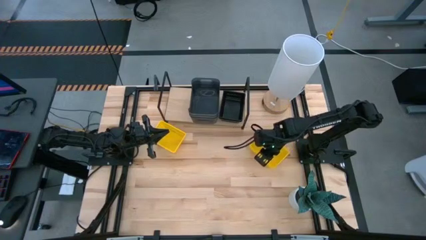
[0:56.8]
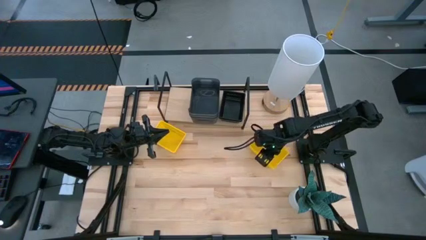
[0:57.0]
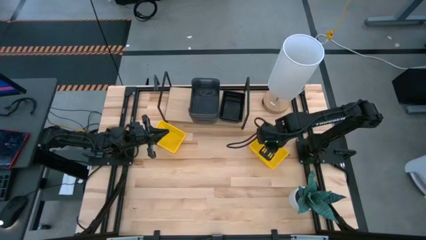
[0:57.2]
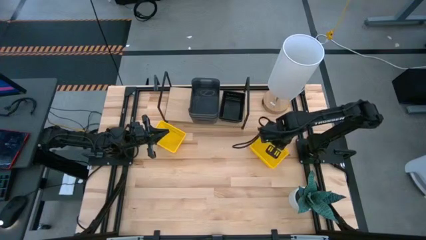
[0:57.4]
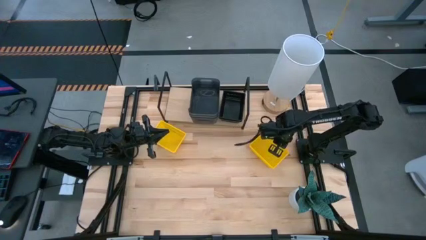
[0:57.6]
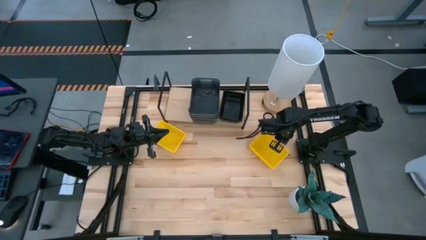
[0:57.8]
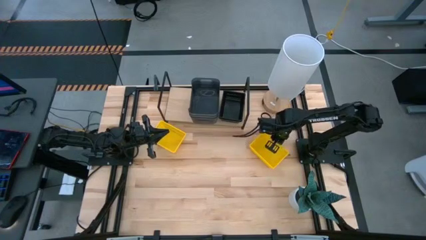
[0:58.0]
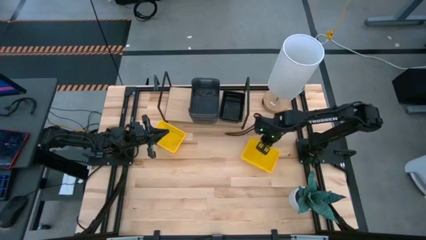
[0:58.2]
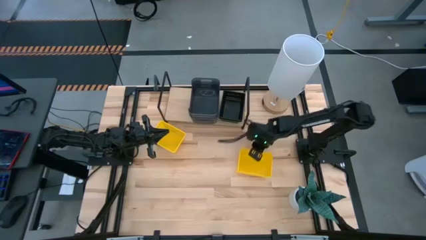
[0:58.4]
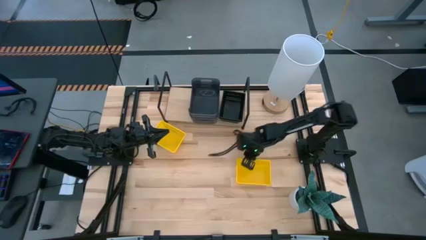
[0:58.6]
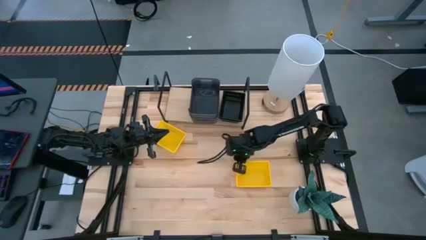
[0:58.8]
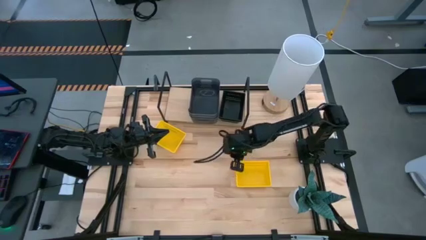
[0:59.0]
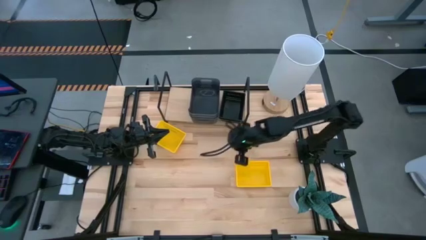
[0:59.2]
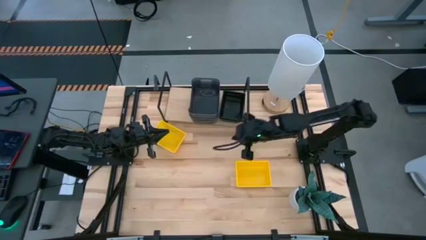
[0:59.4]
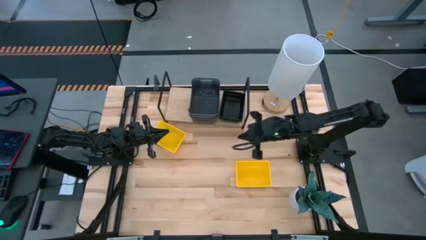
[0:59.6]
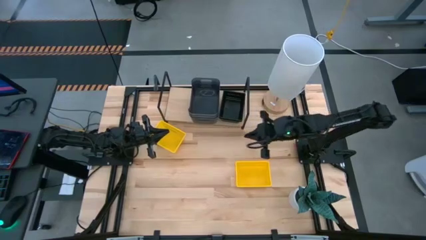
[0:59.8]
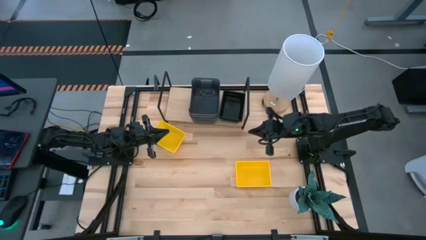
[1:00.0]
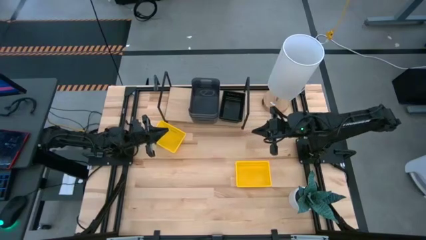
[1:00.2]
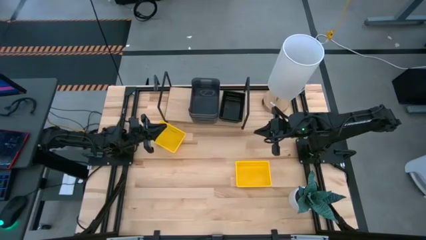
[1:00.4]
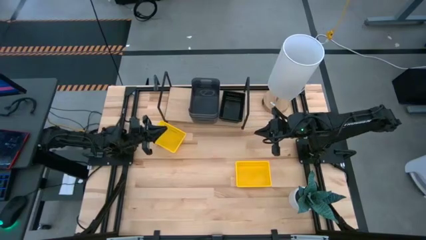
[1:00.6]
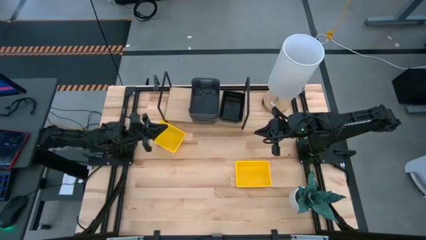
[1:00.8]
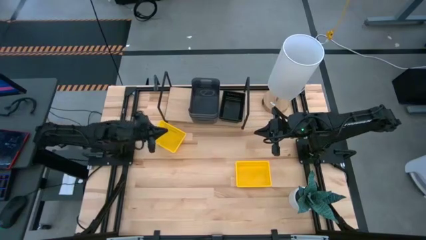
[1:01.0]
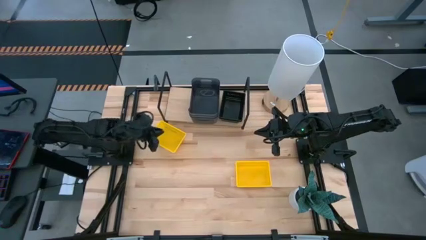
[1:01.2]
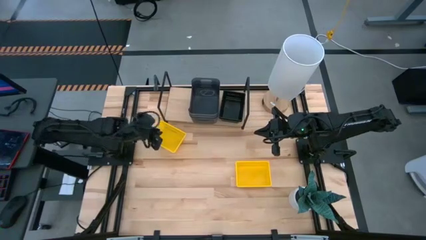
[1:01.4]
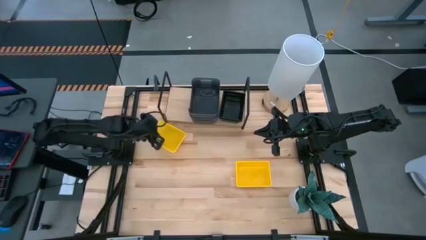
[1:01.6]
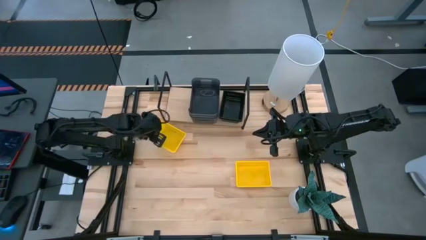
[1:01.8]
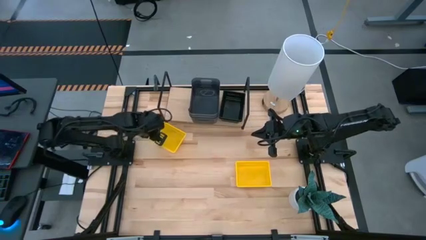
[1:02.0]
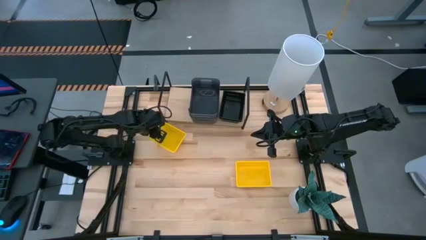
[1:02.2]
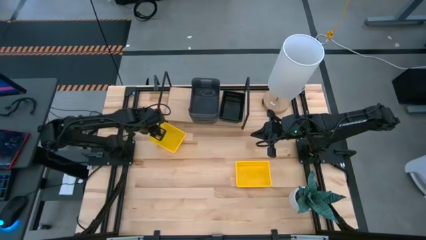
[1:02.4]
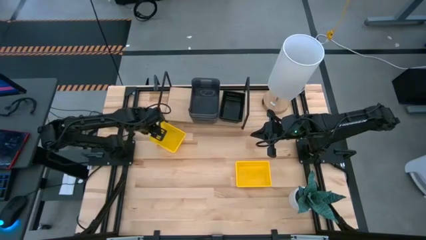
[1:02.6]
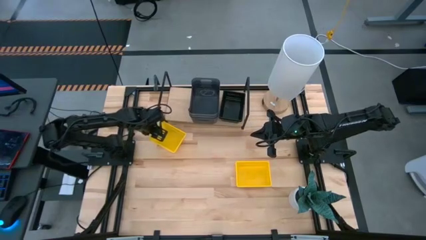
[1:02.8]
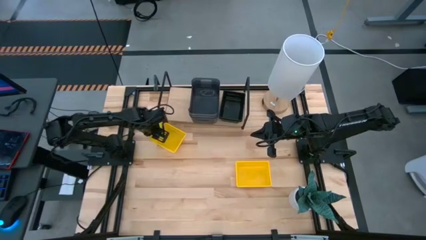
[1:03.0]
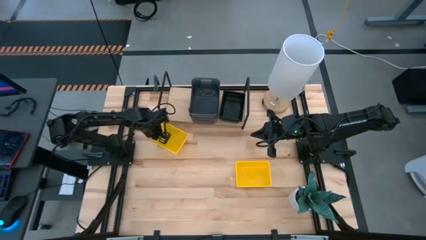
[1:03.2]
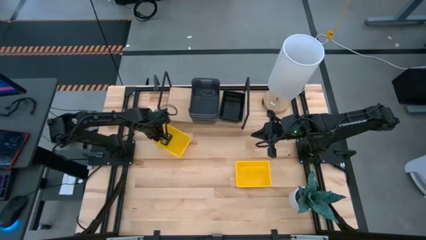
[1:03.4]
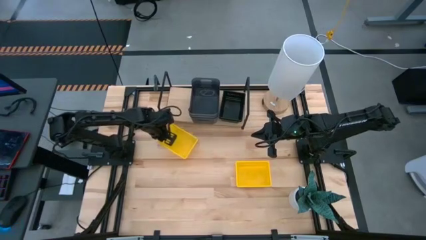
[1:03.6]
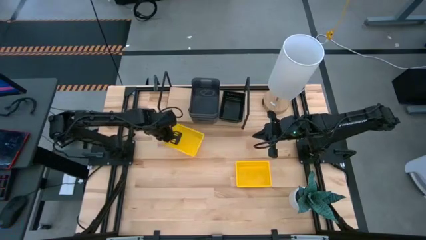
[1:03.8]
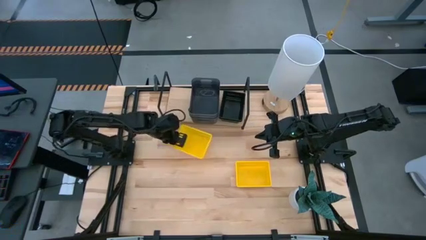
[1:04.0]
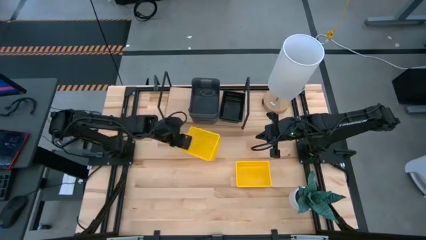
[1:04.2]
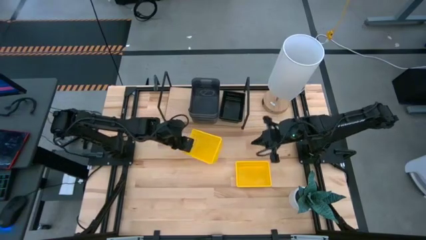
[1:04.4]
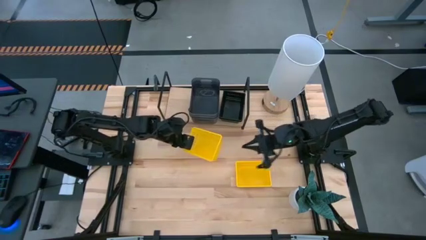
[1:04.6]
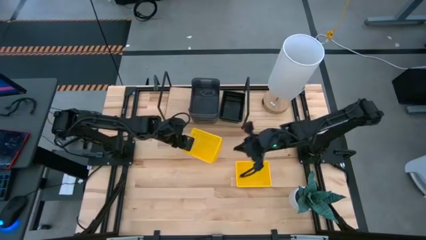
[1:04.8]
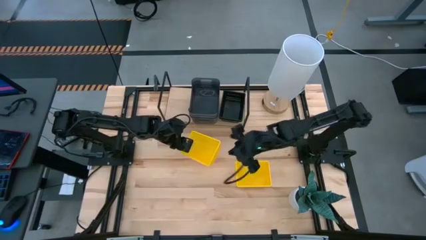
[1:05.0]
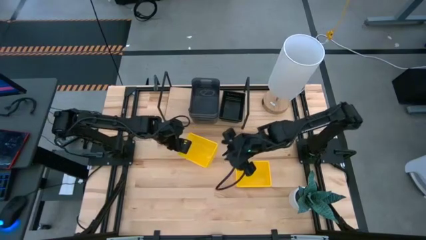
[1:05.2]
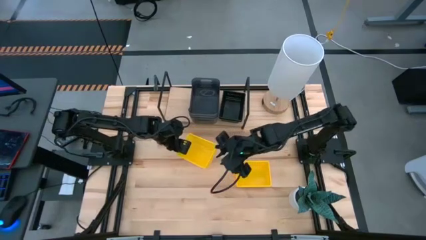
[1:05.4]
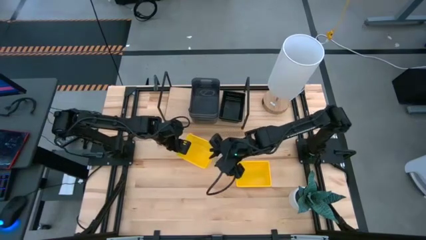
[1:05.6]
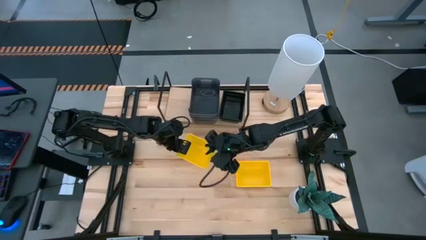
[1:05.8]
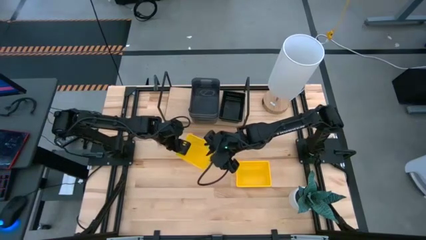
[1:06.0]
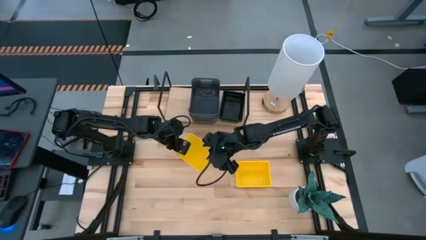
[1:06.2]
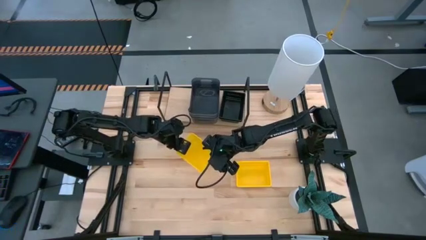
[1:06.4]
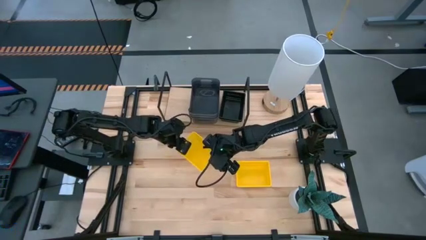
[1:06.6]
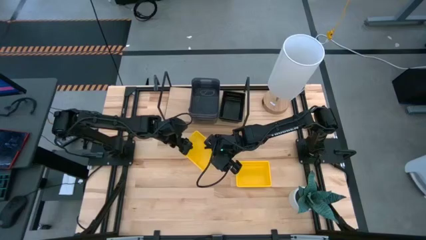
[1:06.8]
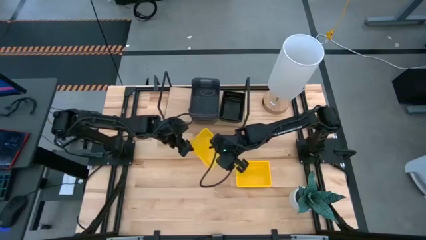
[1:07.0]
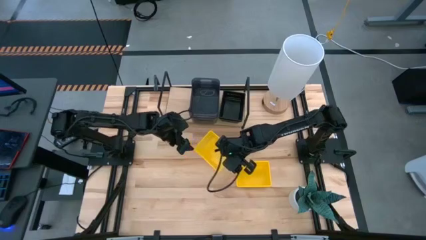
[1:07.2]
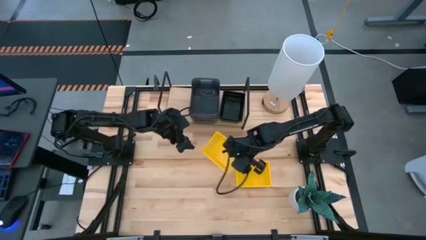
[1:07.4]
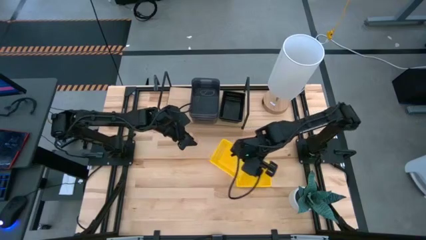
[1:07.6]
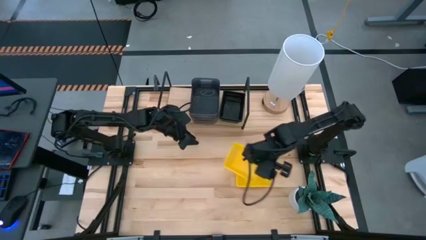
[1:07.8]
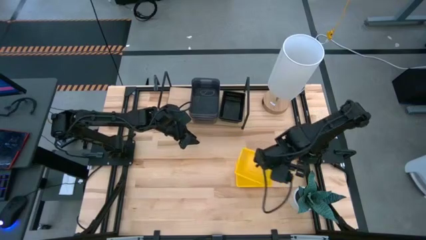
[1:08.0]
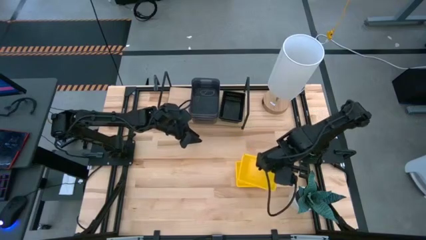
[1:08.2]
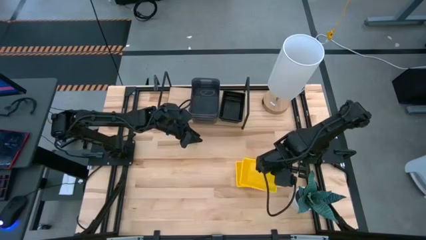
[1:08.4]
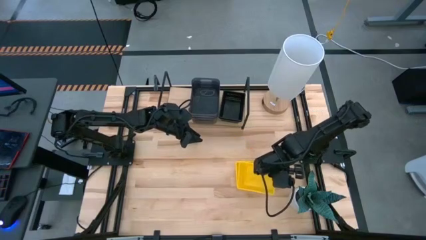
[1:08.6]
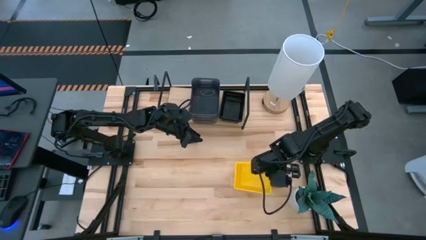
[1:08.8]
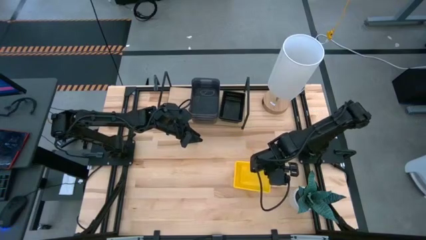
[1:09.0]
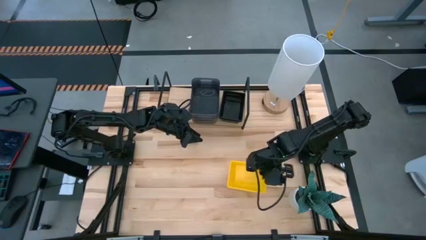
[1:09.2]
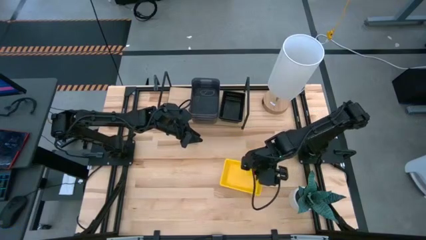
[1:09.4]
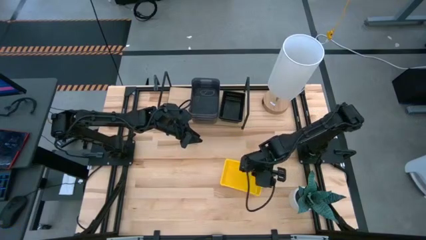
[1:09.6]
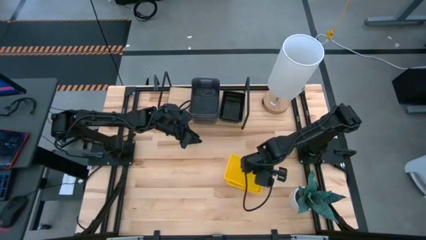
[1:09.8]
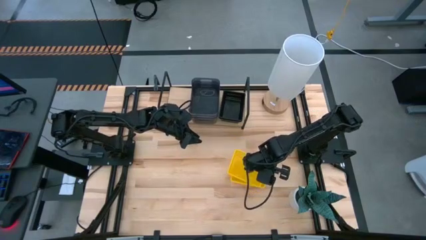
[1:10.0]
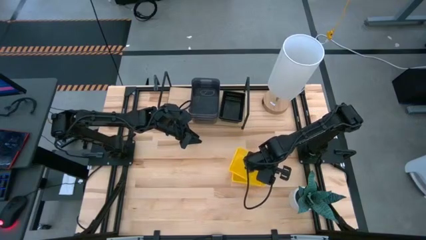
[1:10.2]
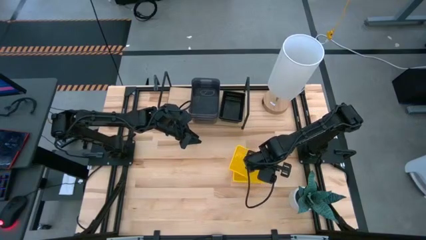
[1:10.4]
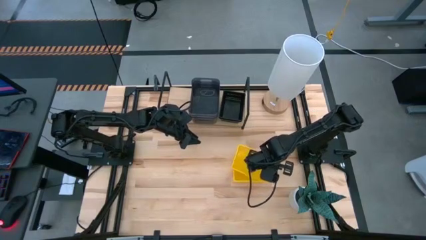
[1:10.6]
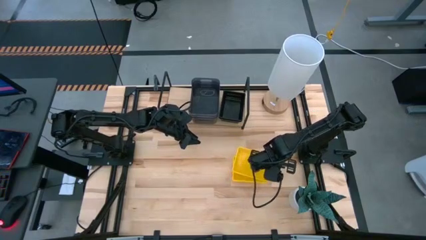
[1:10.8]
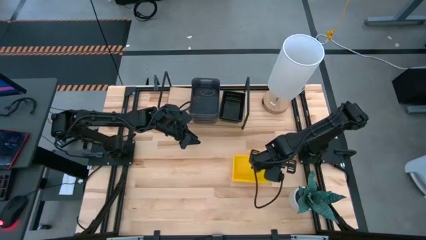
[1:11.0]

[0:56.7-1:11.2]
Task: Stack baskets on shelf by color
Stack the yellow bin on the top of the yellow bin

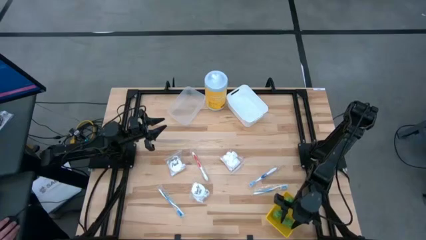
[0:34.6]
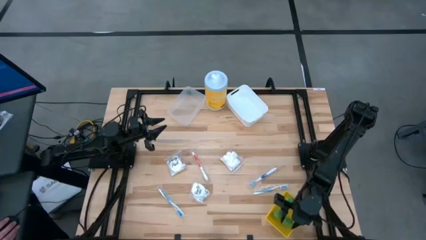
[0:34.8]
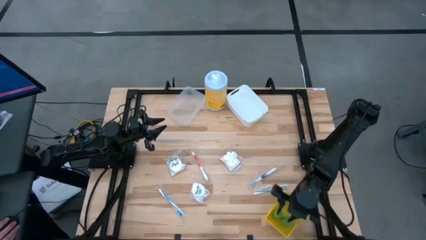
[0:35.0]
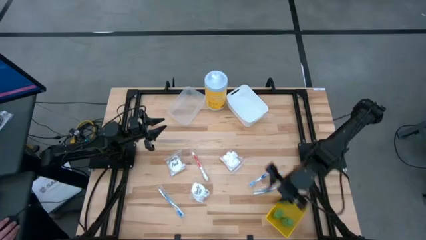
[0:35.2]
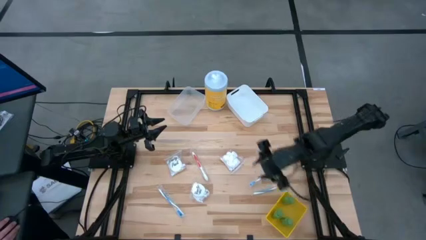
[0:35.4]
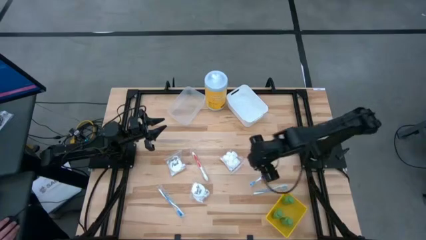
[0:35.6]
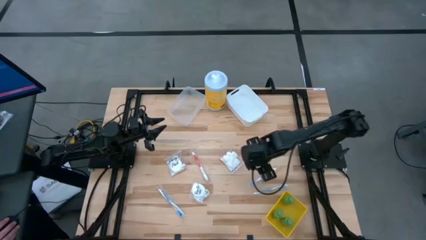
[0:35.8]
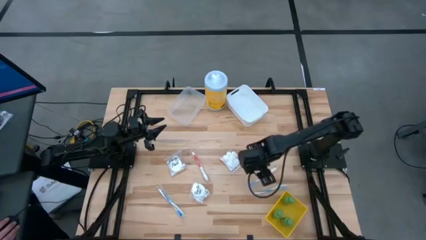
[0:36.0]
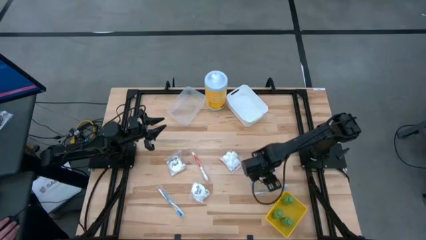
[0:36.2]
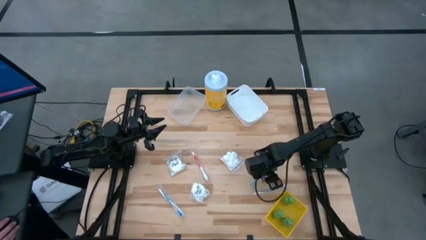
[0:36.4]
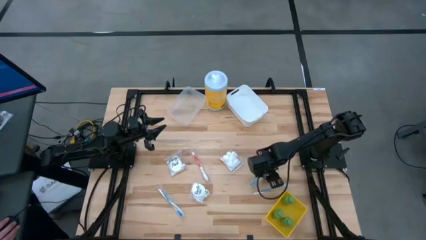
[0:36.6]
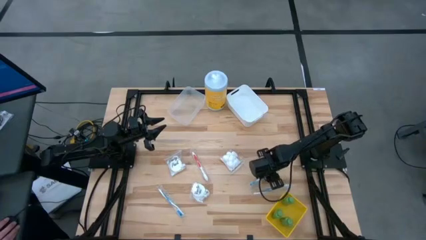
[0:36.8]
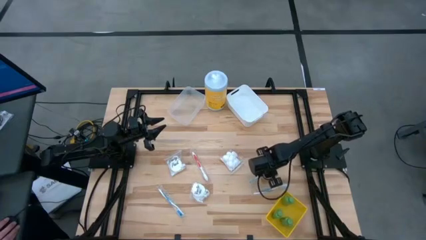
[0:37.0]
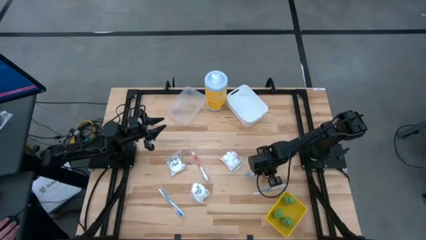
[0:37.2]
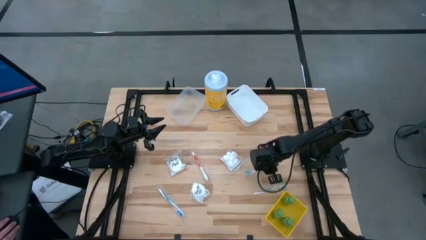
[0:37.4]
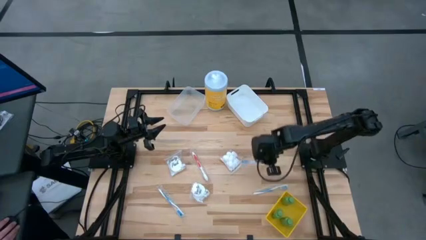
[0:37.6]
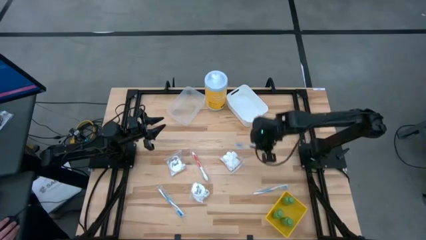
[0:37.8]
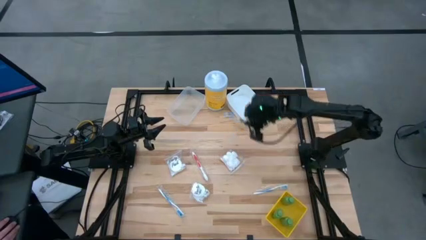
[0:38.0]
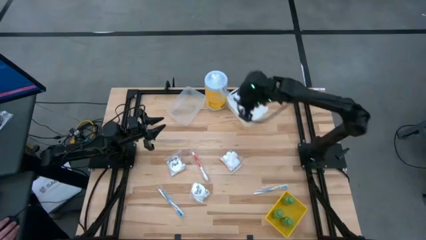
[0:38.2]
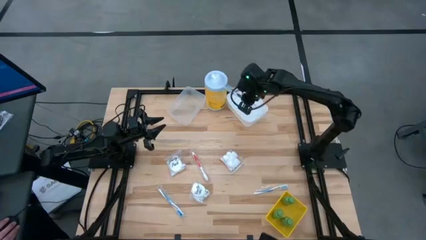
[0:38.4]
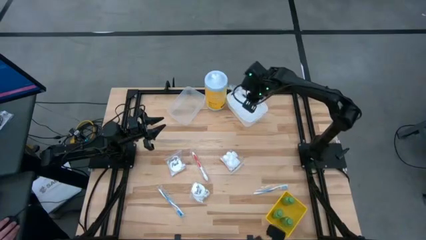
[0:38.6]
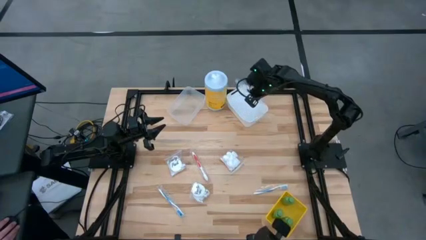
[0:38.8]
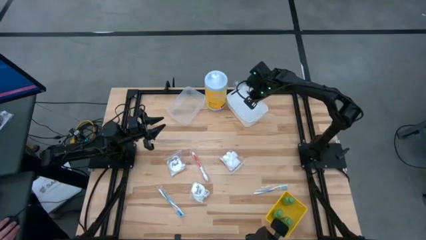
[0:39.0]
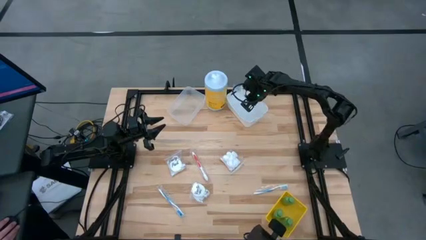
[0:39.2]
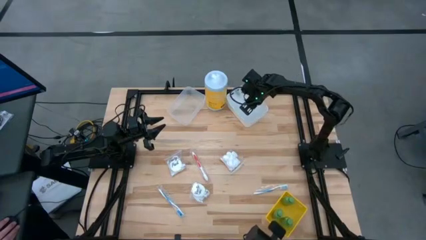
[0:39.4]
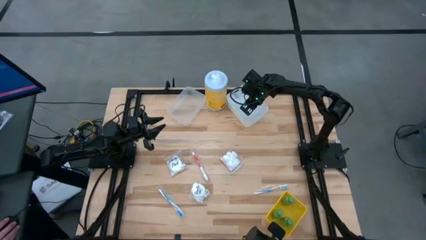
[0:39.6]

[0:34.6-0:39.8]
Task: Pick & Place Travel size toiletries
Put the top right blue toothbrush into the white bin
